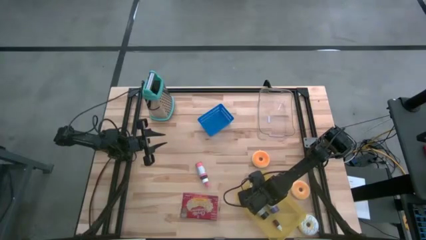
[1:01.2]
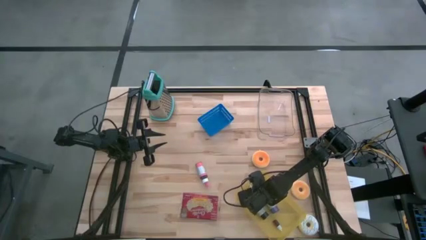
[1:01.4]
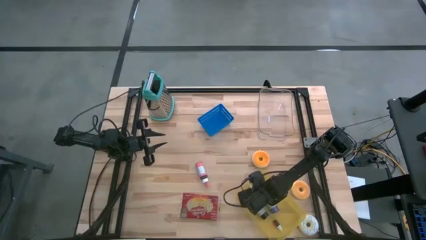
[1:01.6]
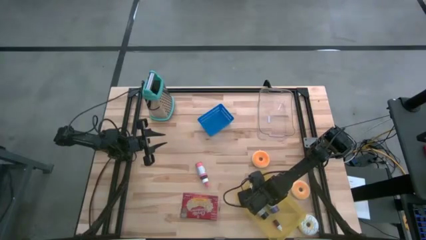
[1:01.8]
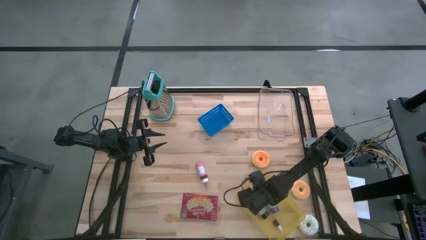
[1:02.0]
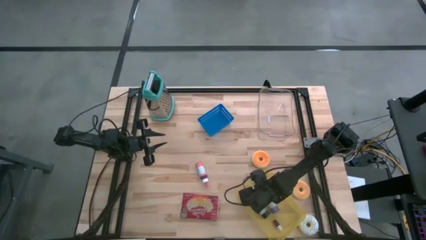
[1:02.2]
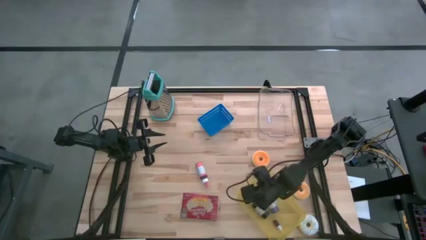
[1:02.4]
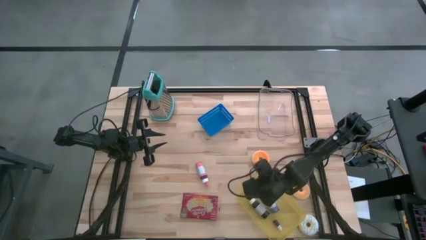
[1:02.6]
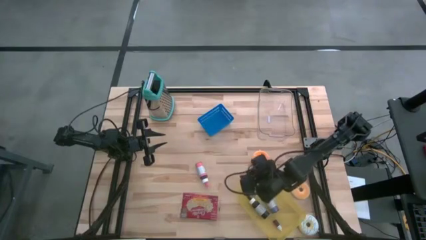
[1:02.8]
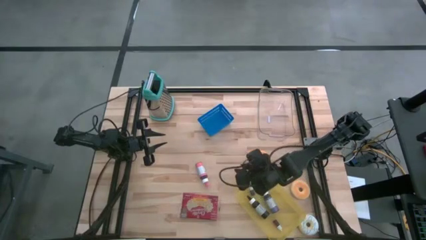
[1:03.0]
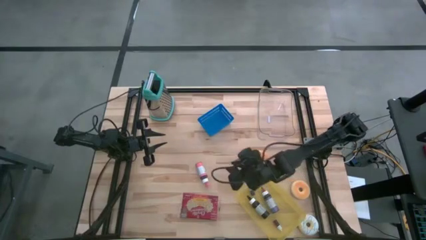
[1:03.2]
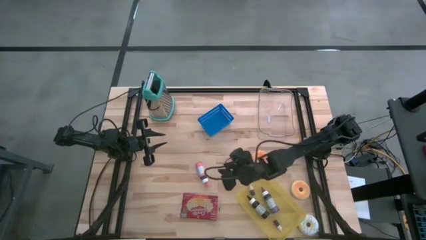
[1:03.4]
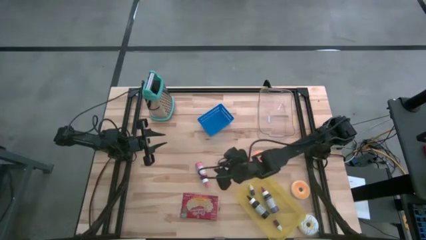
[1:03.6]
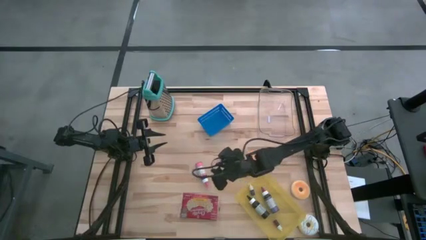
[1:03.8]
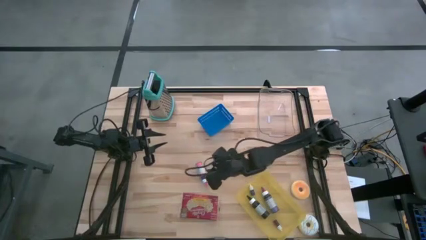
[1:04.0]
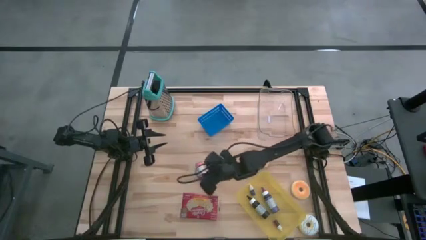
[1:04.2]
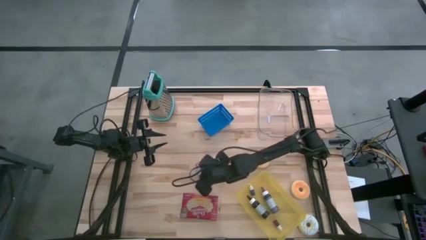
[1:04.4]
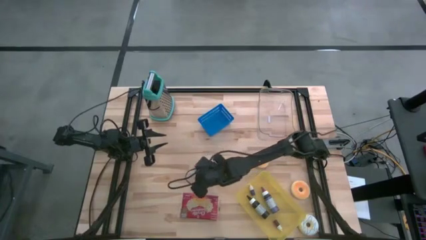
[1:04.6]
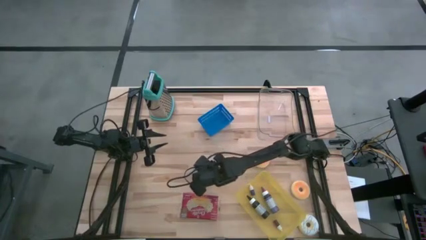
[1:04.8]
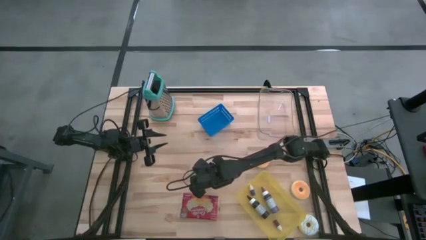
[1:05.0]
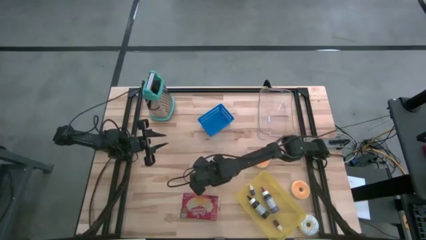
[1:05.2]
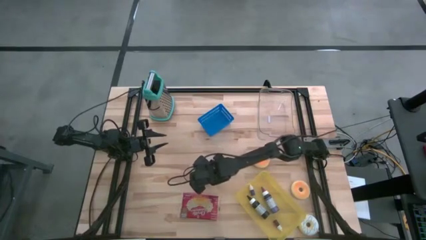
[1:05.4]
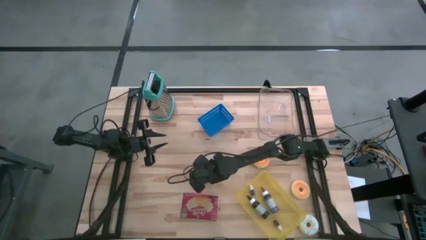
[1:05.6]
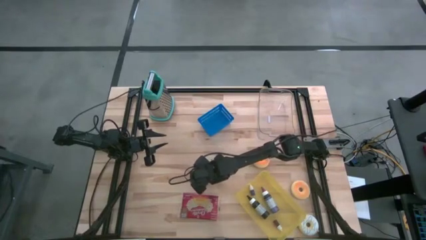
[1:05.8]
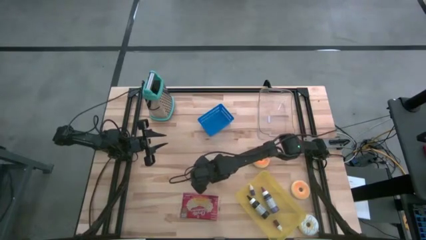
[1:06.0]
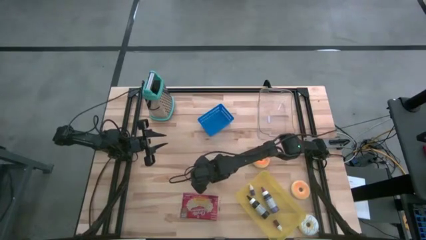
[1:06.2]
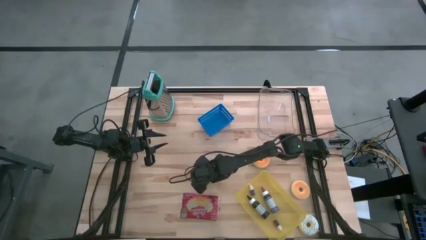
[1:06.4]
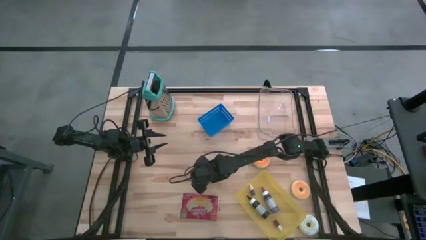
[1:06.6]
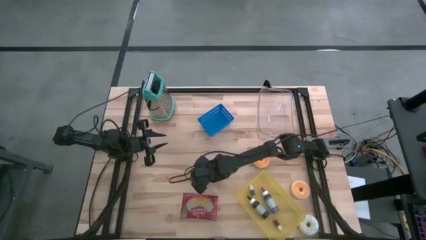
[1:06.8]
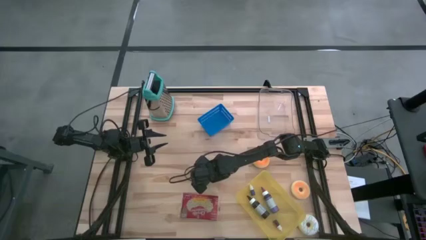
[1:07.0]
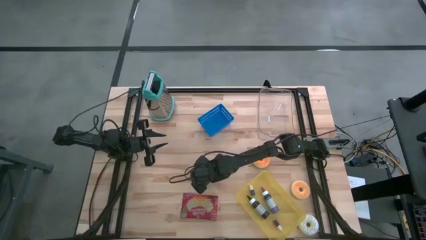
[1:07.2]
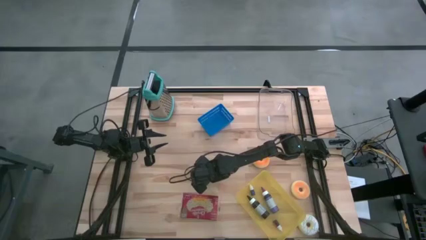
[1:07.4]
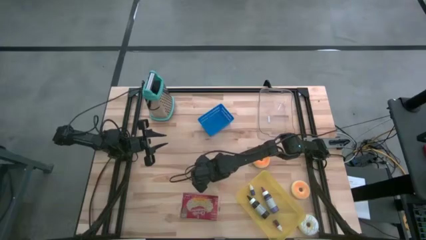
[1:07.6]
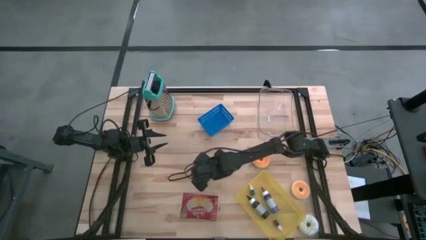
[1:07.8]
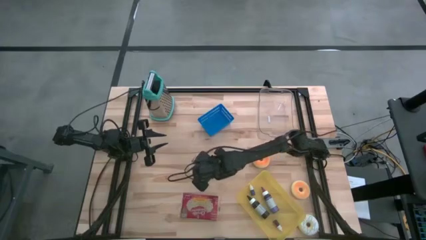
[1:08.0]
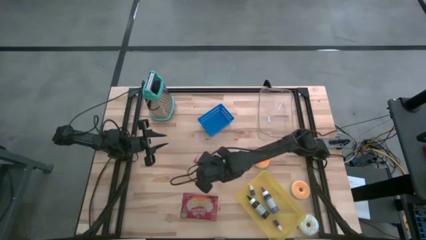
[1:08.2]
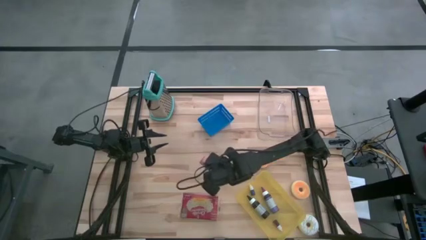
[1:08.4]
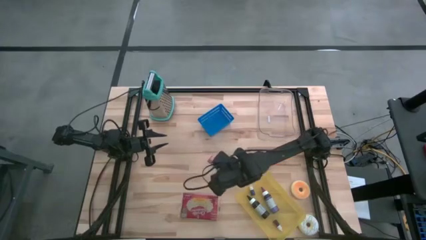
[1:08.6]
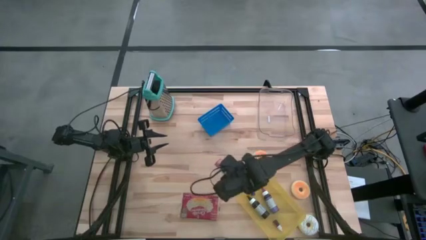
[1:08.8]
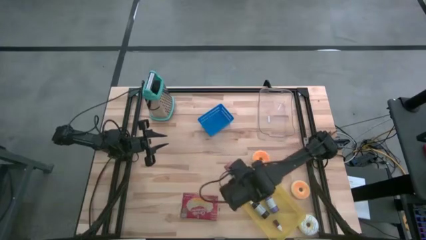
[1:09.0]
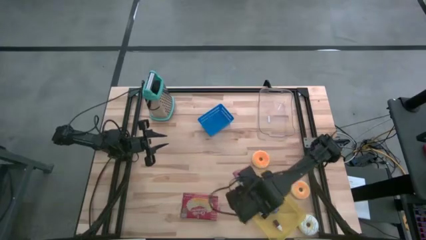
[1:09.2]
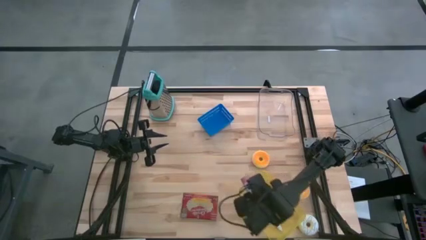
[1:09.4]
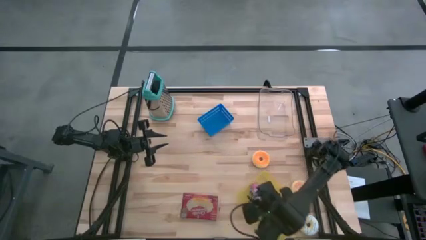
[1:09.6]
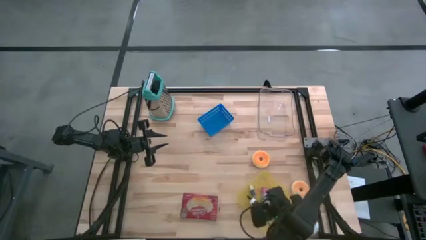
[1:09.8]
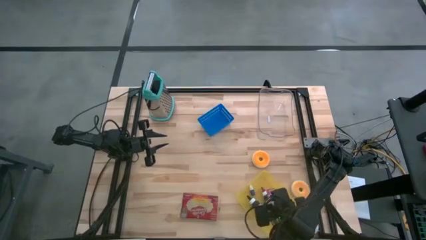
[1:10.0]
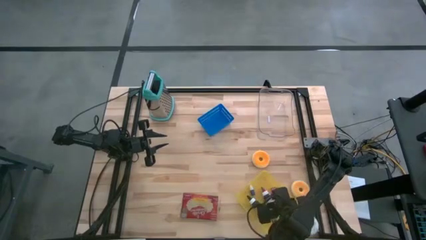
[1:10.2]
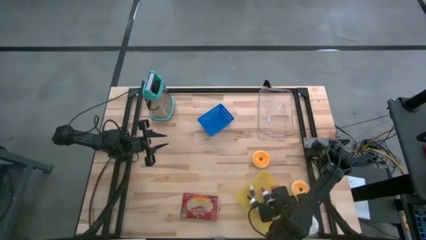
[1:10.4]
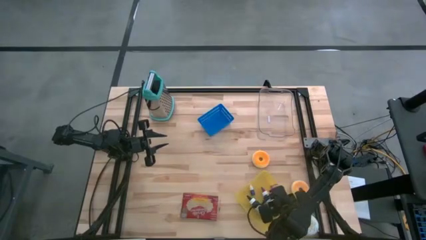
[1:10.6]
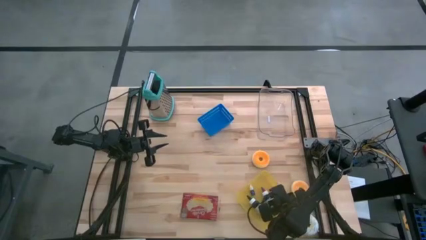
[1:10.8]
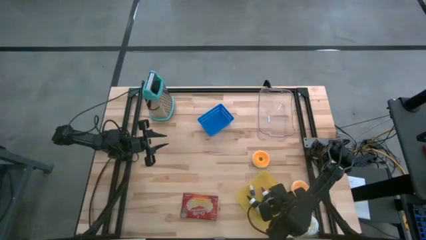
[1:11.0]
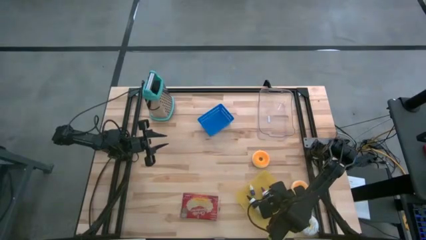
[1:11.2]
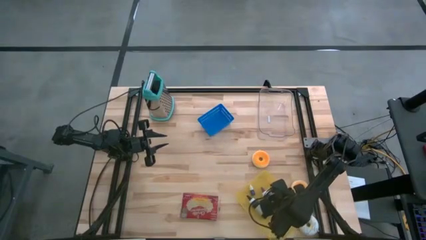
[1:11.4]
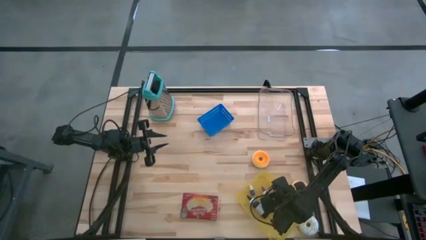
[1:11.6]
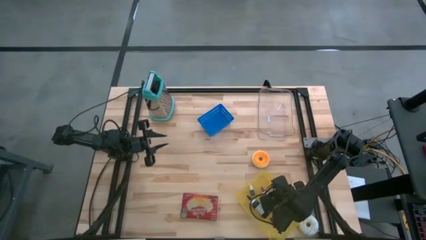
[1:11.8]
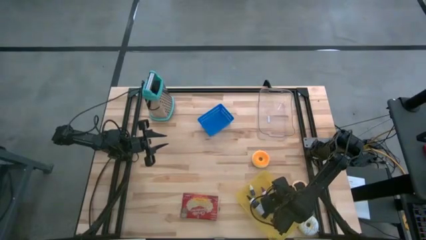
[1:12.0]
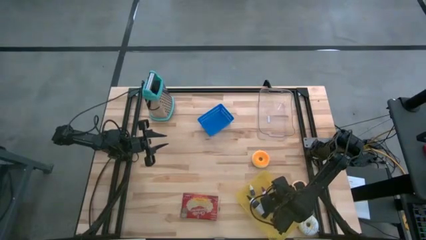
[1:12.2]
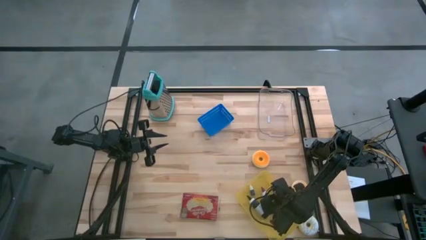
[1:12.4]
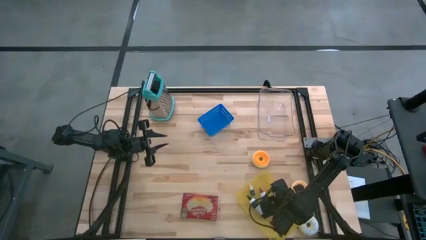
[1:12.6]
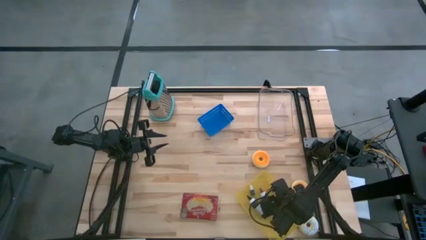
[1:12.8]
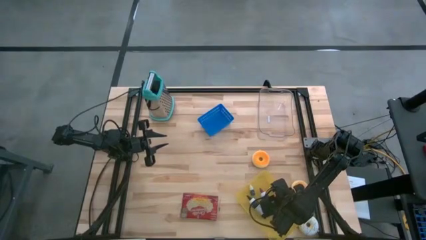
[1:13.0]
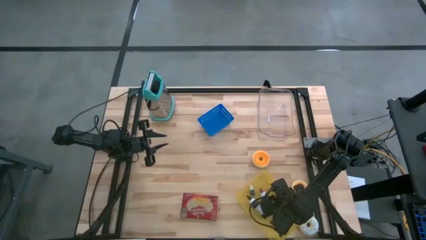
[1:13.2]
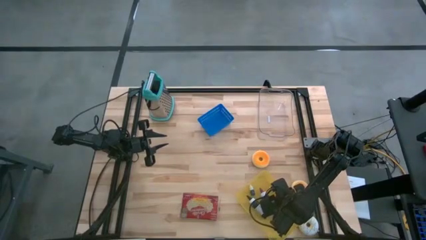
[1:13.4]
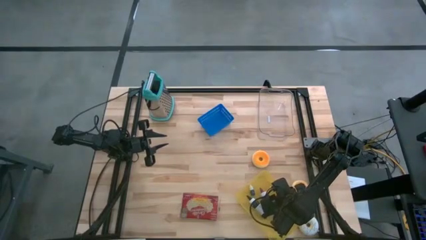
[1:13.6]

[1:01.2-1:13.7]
Task: Pick & Place Food Item
Put the big pink food coloring into the yellow bin

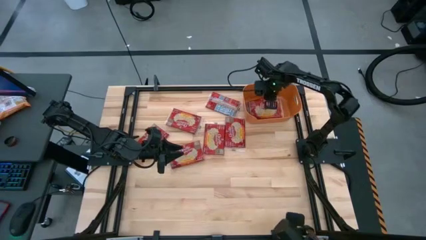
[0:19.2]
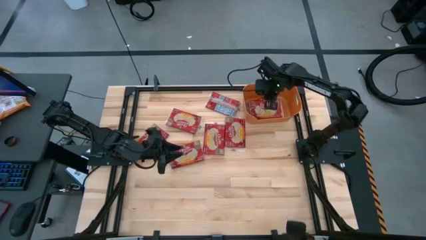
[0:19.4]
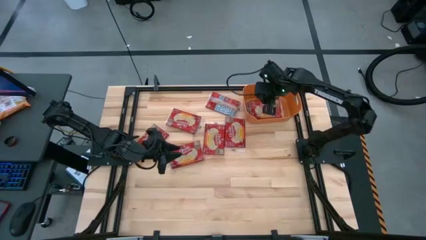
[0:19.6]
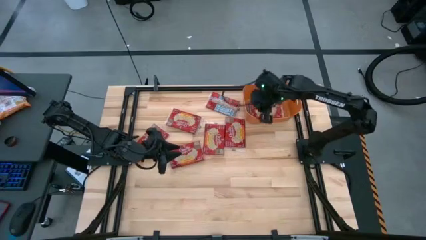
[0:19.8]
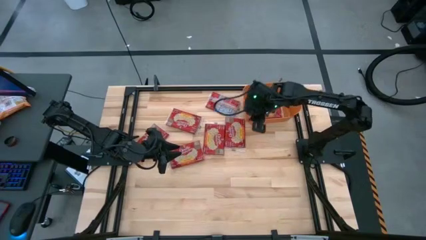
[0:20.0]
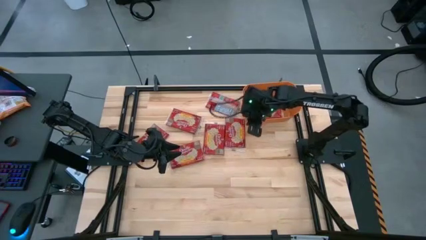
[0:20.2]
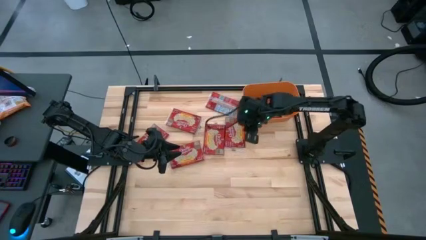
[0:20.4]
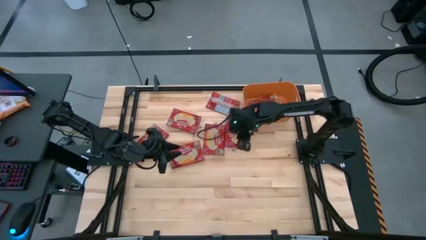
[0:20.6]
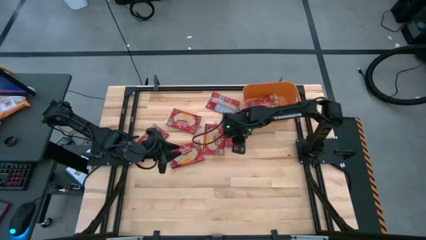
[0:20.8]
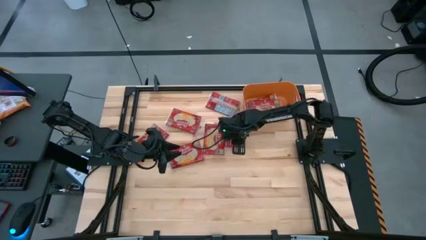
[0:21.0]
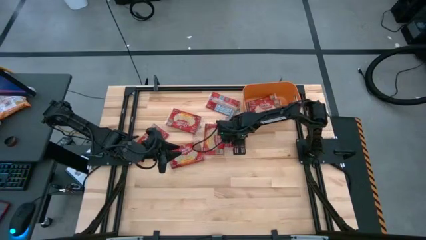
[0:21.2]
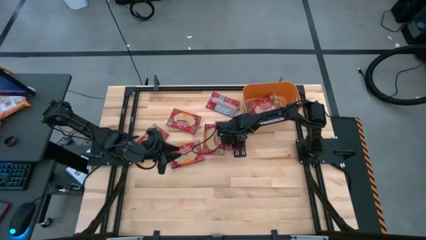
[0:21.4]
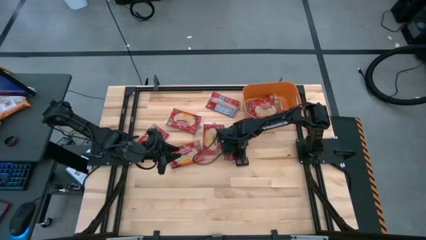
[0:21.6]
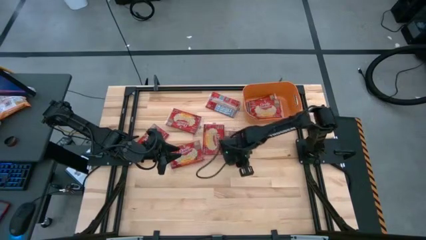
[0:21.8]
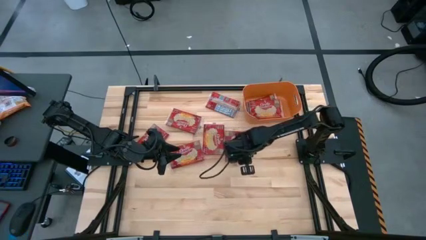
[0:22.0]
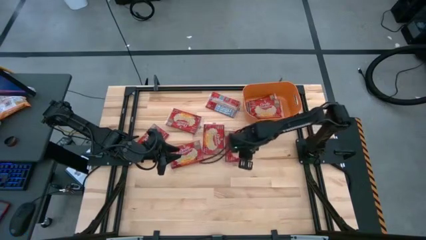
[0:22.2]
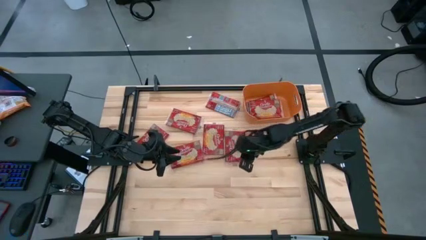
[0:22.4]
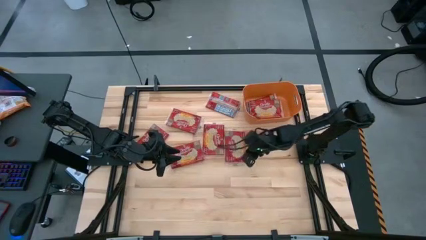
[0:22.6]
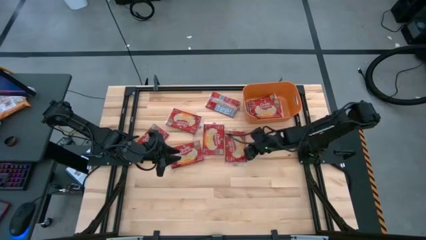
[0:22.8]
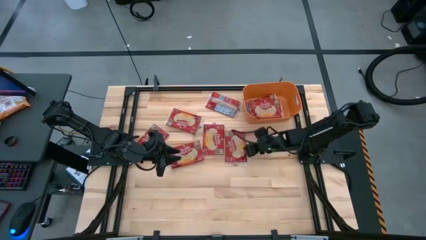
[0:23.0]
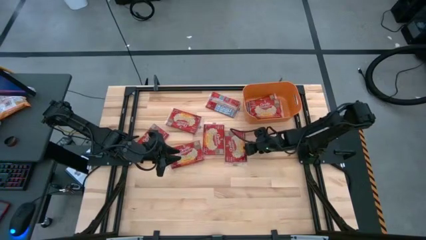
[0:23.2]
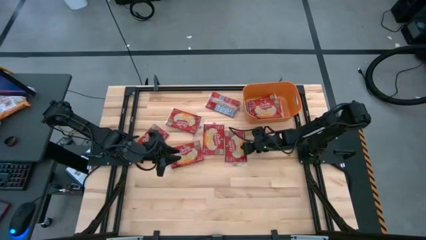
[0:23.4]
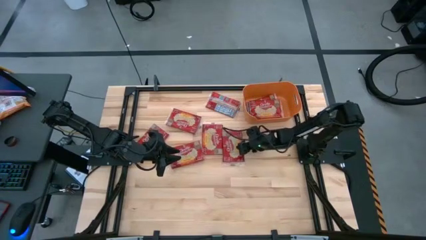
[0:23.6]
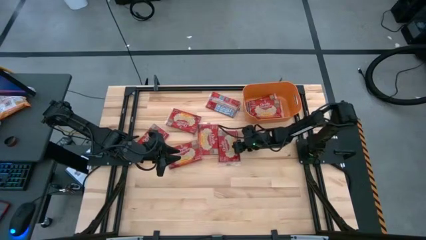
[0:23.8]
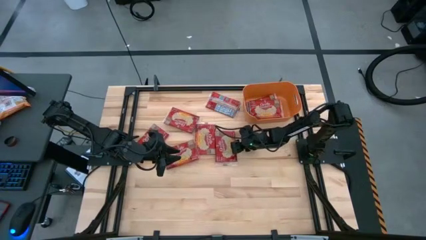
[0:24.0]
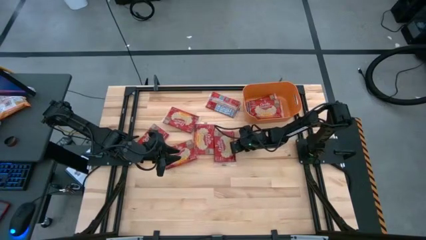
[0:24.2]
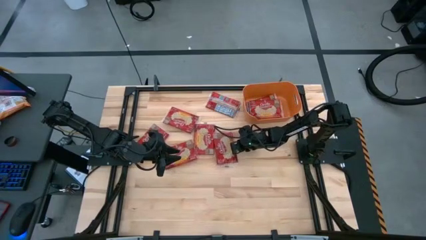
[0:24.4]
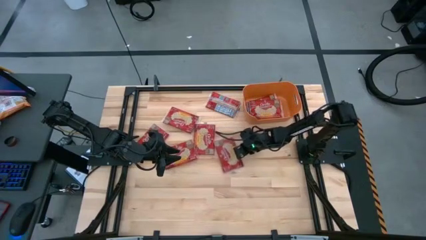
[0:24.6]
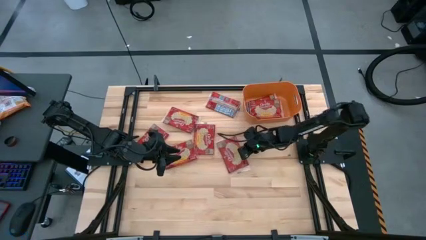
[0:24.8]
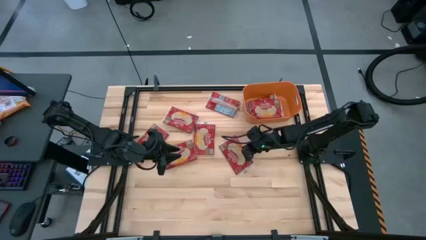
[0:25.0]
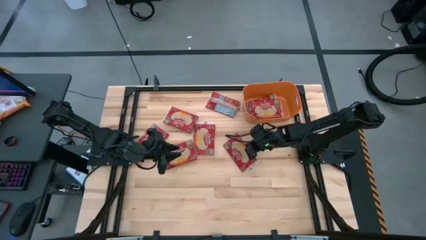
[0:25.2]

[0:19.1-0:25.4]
Task: Sort popcorn bags into baskets
Put the red popcorn bag into the orange bin
